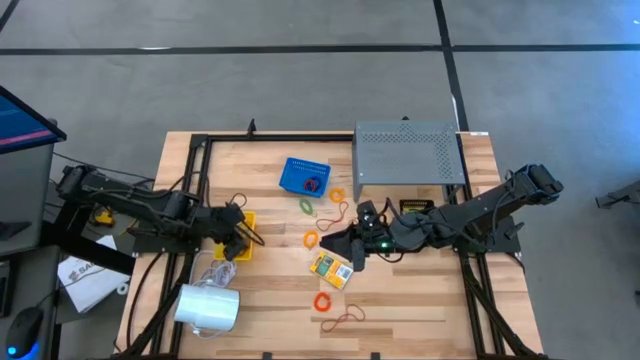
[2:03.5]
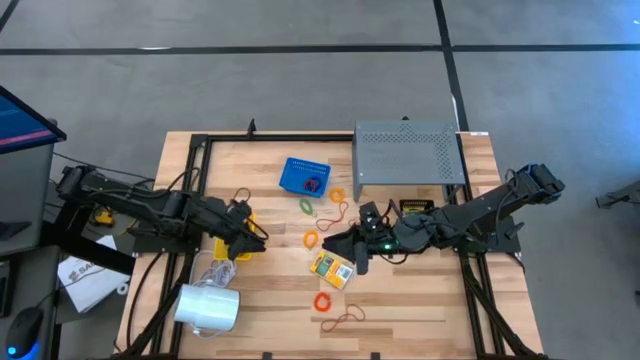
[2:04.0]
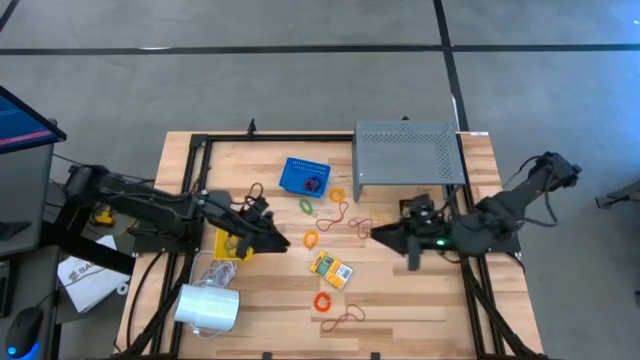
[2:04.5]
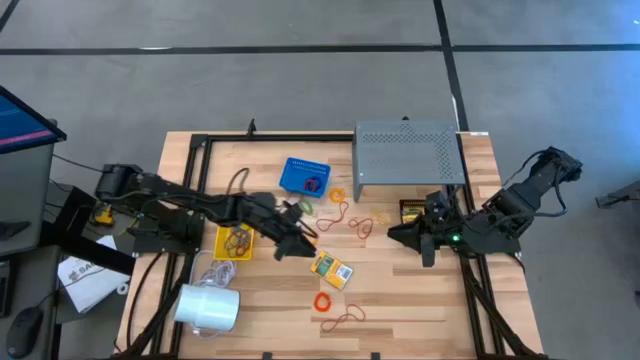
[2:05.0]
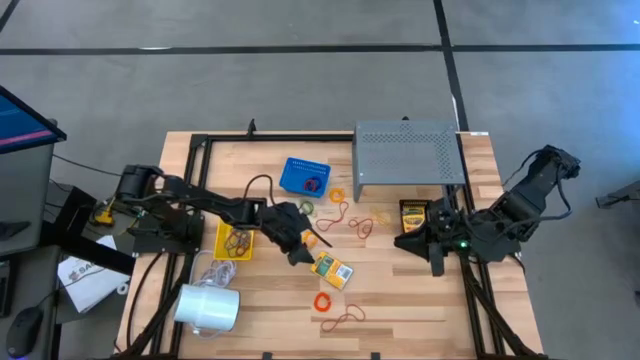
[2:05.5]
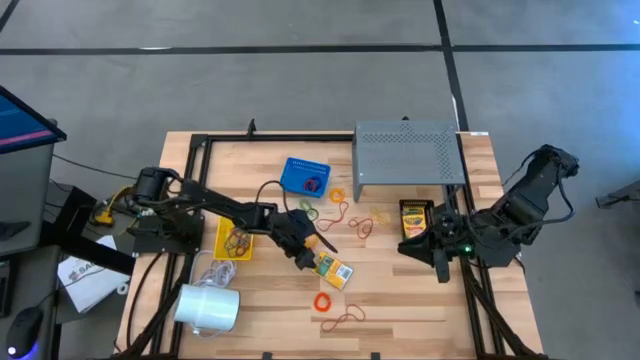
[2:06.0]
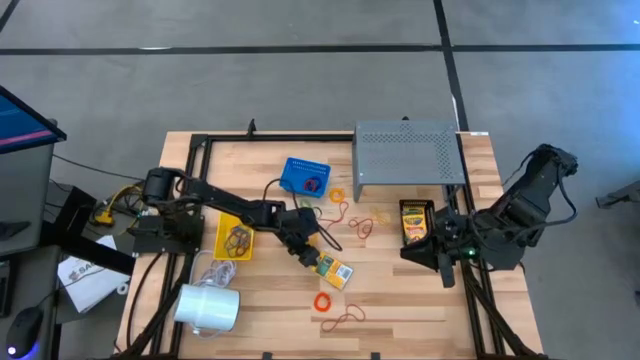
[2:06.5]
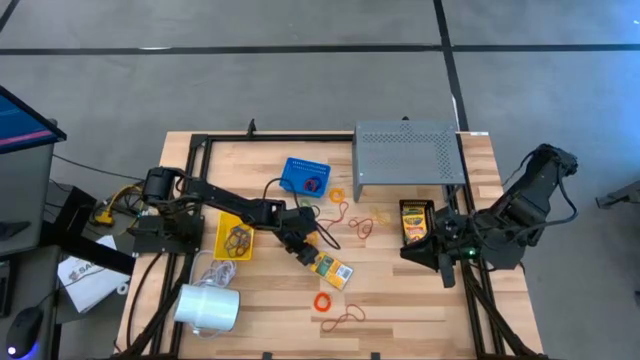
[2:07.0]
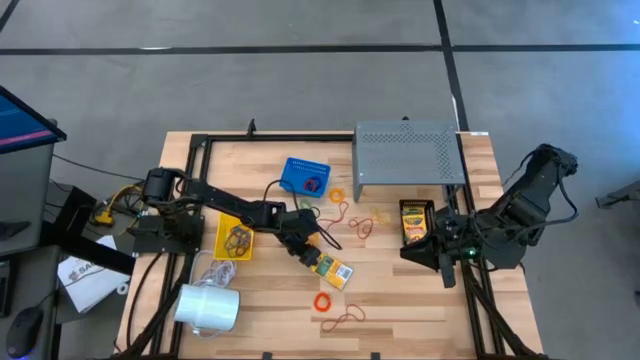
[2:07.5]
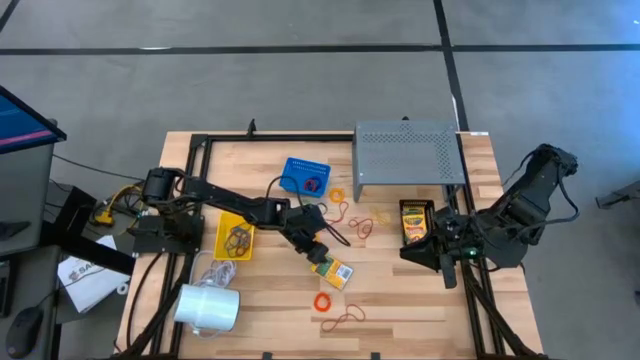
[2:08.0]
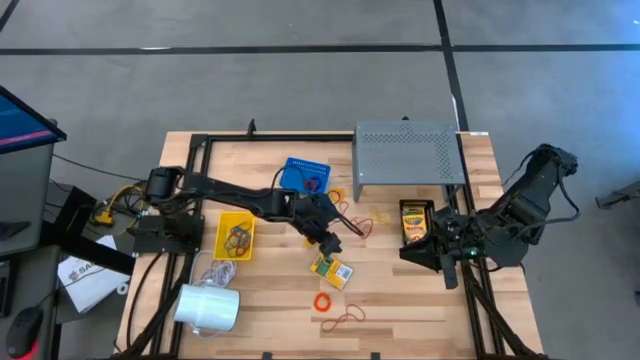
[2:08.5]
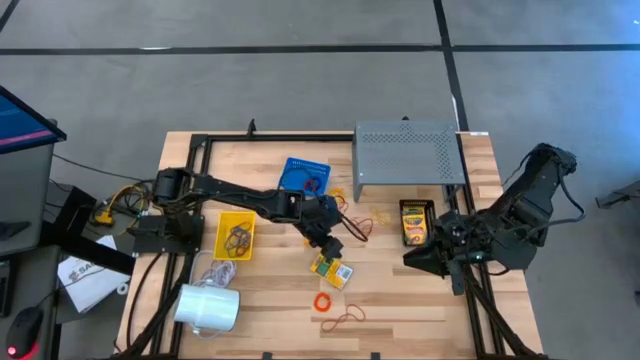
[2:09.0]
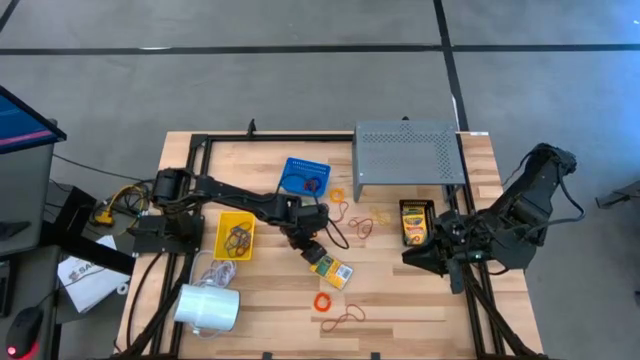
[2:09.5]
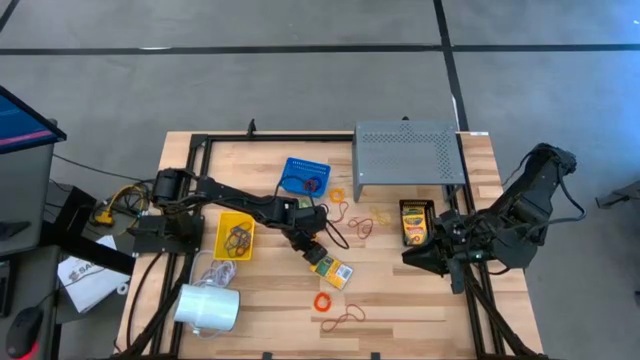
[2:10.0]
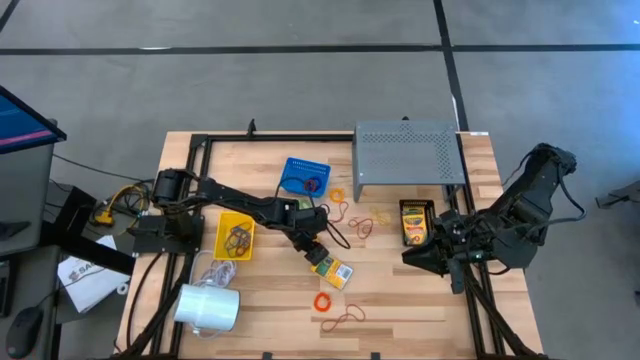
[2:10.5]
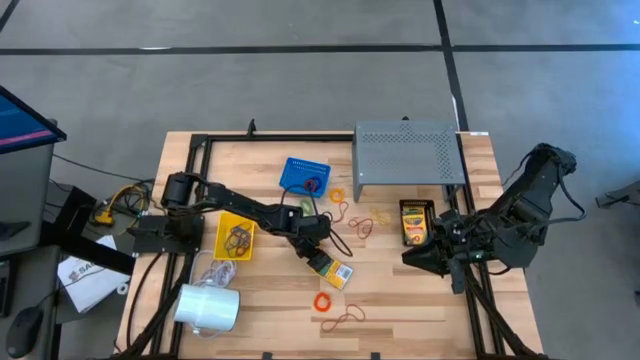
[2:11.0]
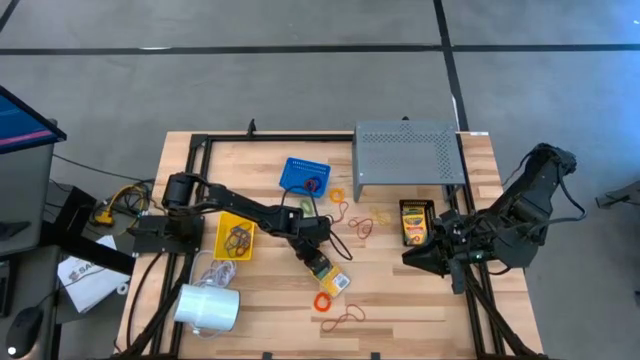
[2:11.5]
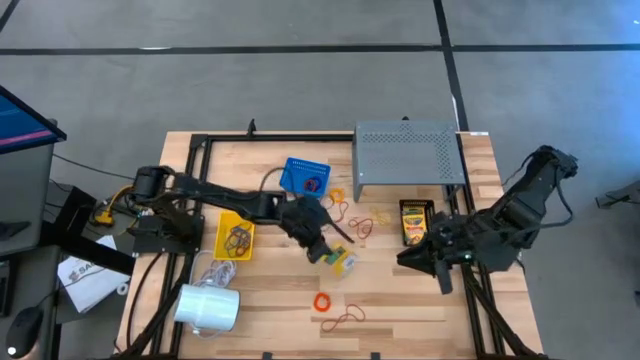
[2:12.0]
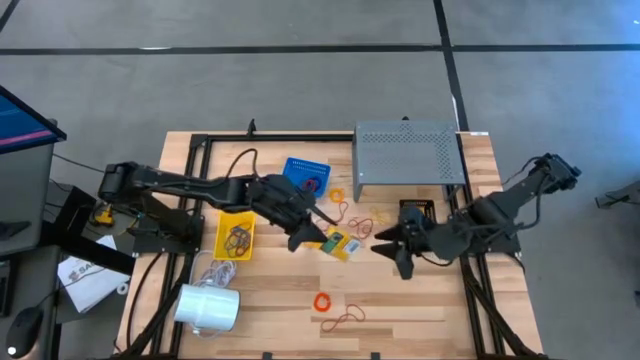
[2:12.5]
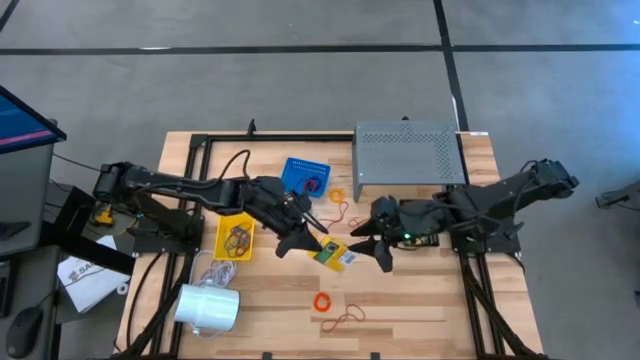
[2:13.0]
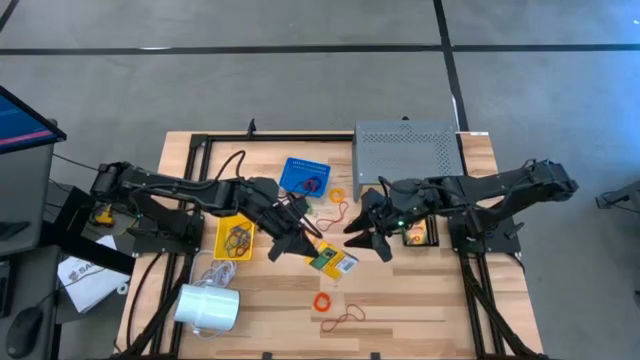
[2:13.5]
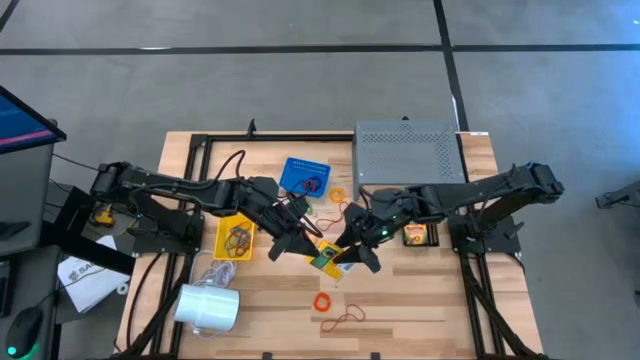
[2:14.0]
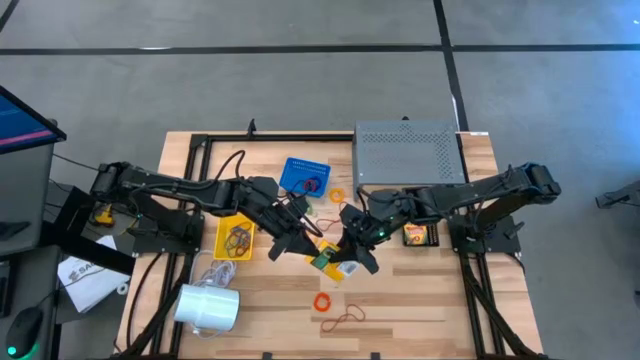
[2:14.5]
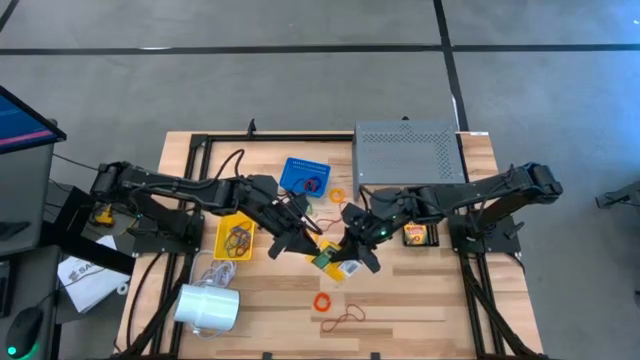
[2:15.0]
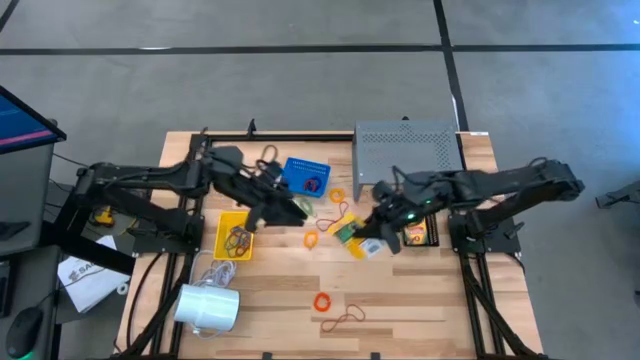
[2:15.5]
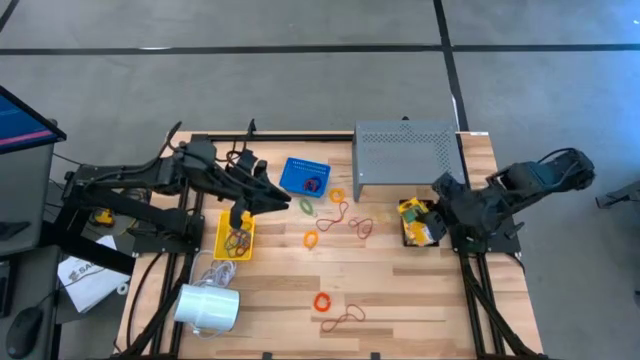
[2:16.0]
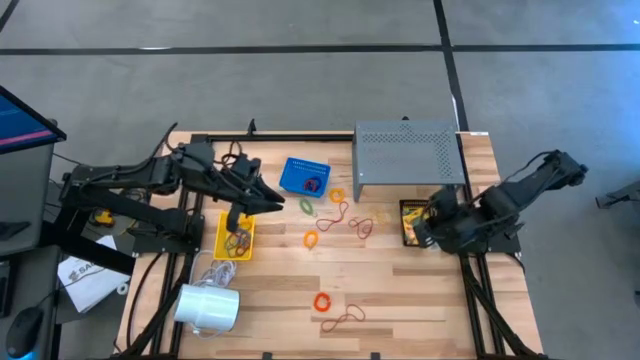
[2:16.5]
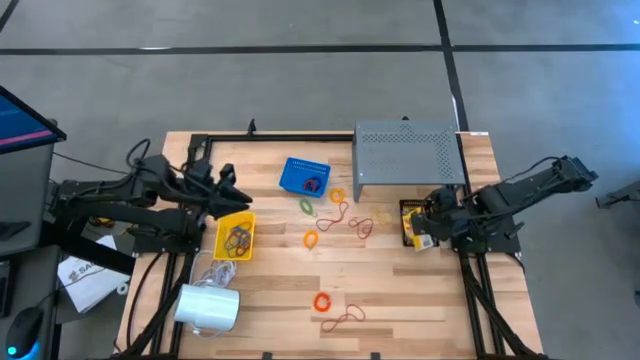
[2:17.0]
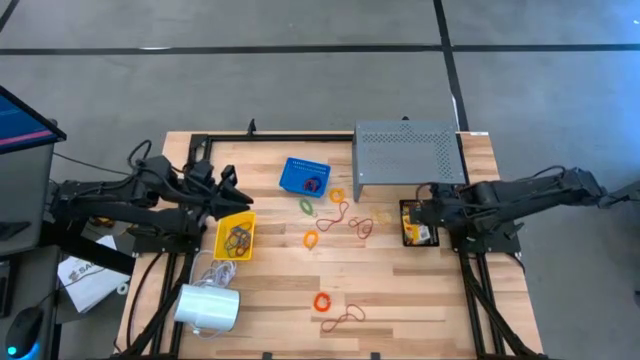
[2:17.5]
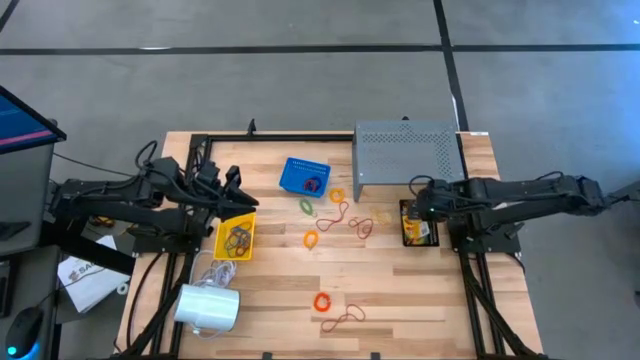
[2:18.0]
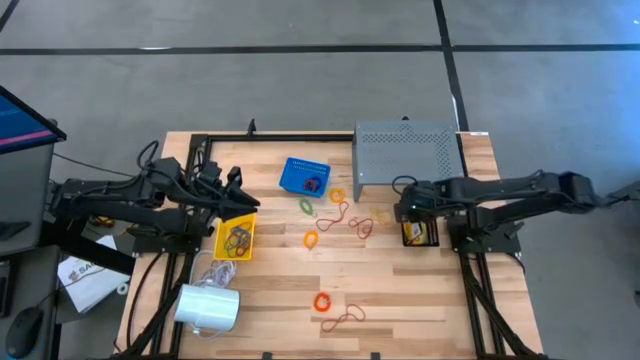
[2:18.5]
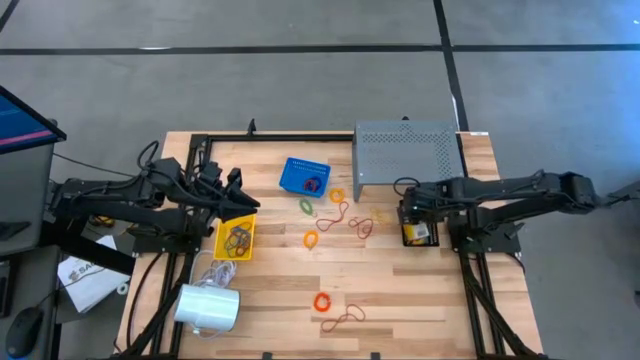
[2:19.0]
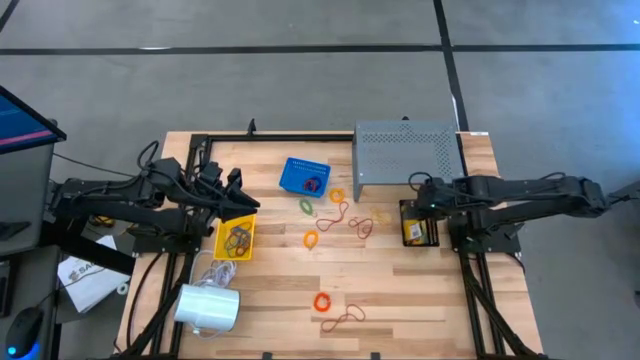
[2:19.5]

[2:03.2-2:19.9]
Task: Pick & Place Office Desk Supplies
Stack the yellow crayon box on top of the yellow crayon box

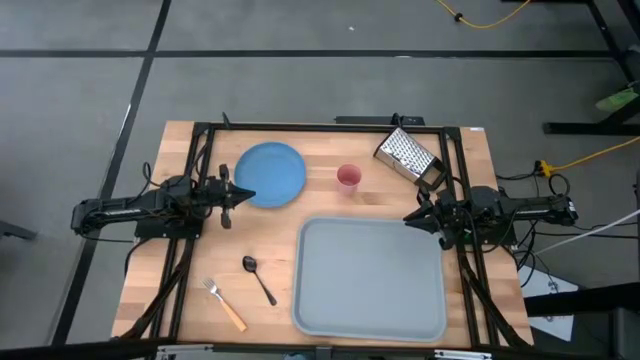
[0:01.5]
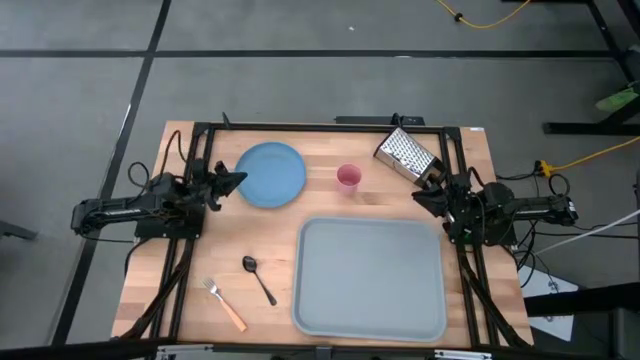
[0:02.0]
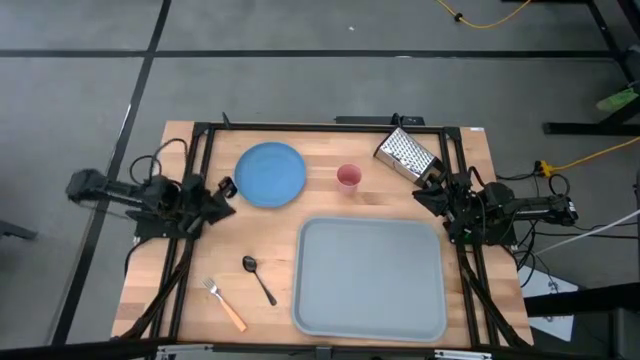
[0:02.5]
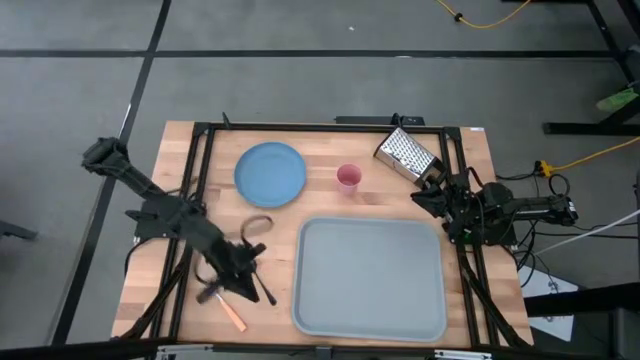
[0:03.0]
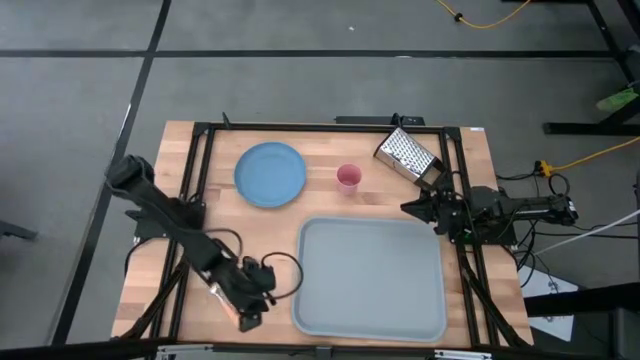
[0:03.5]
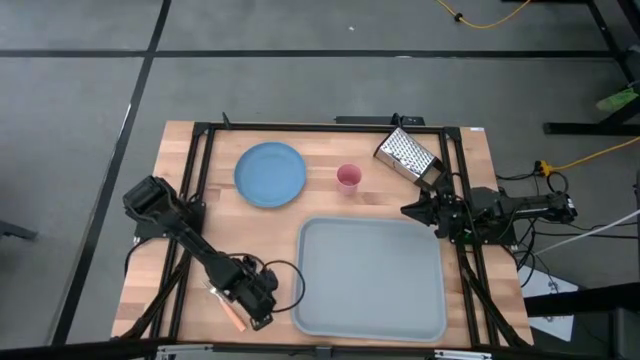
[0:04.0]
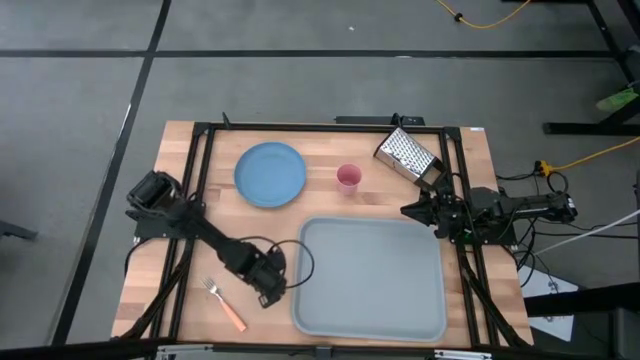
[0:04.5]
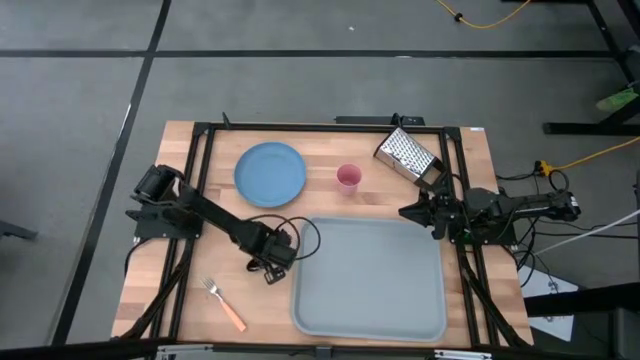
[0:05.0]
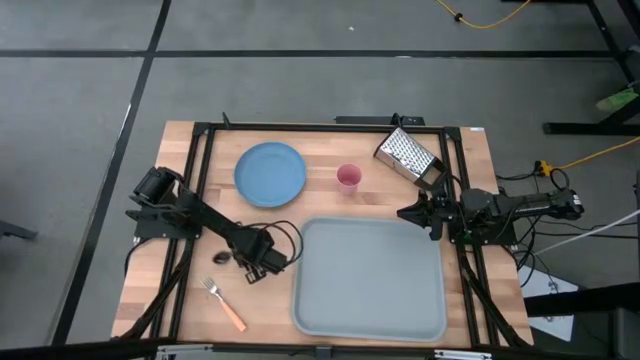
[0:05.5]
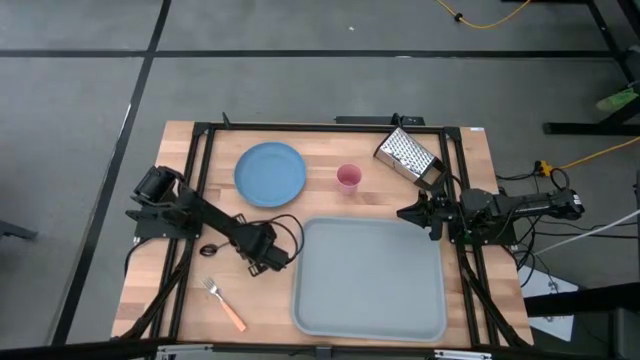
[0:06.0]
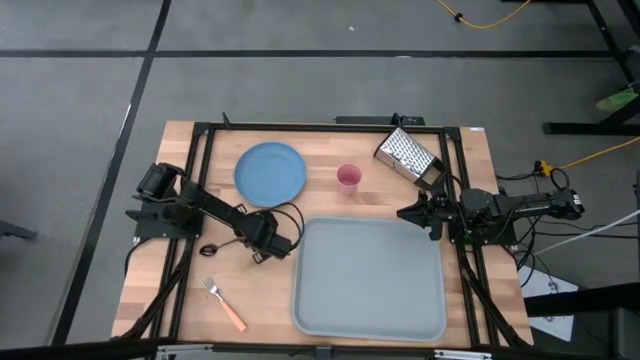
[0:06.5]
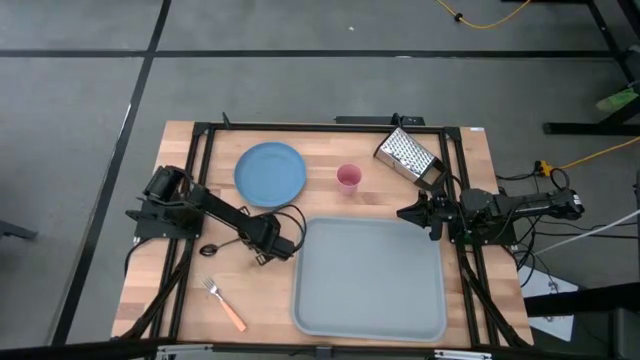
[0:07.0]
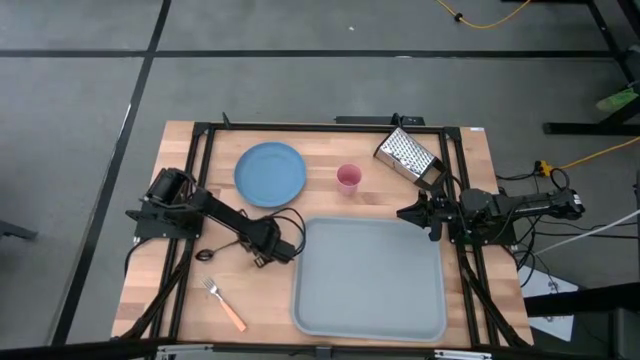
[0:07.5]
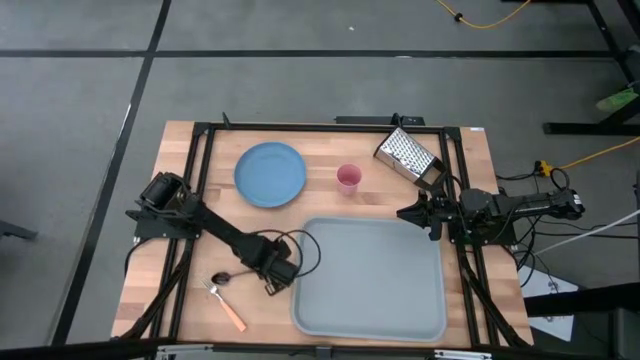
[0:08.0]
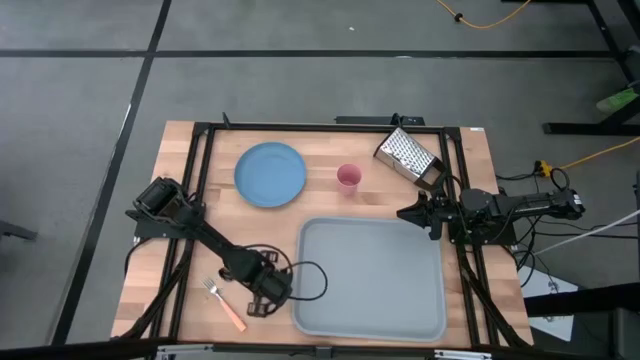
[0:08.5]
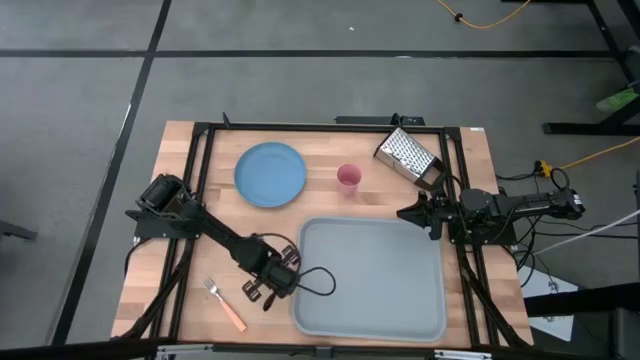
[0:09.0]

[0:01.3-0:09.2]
Task: Pick and place plate/cup/fork/spoon on tray
Adjust the black spoon
